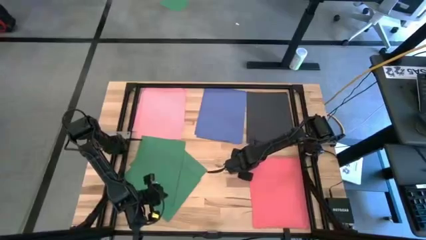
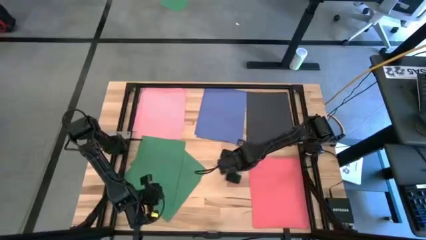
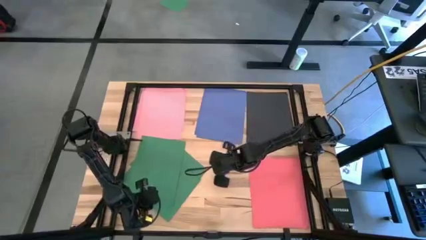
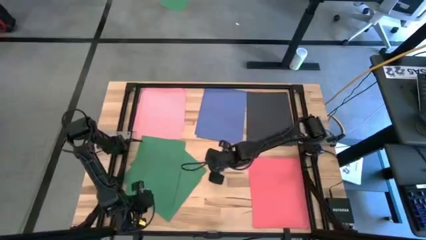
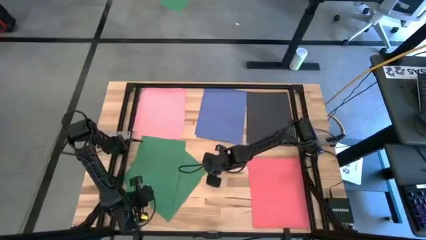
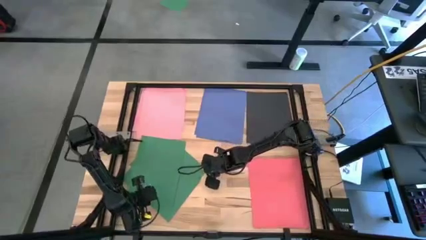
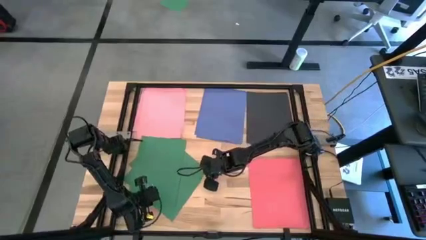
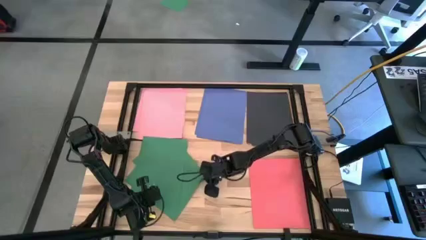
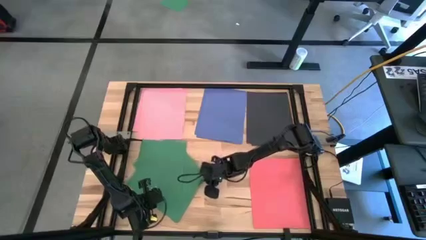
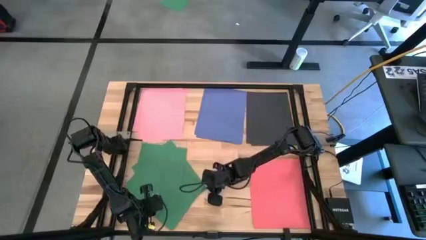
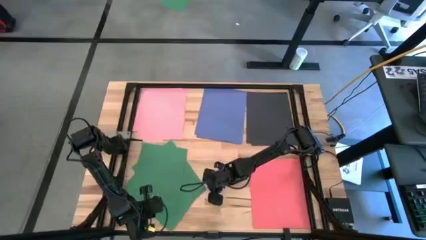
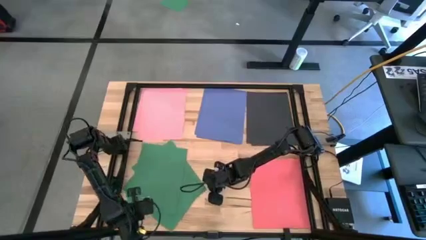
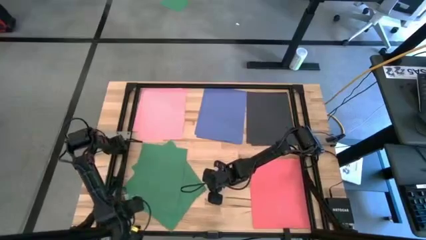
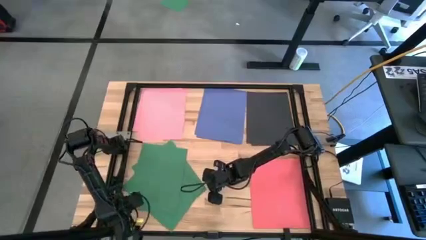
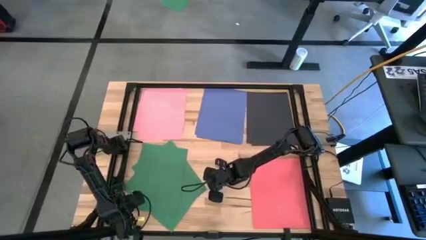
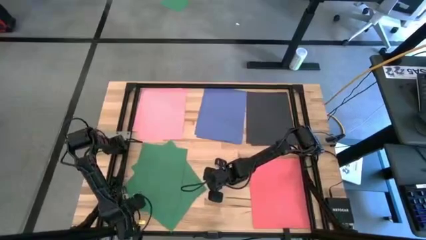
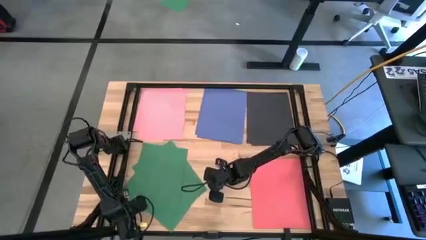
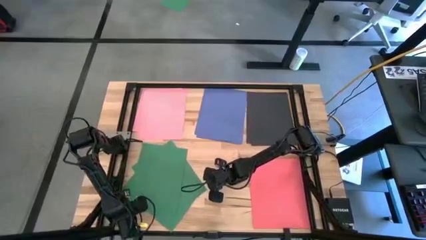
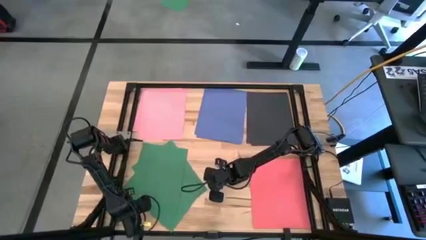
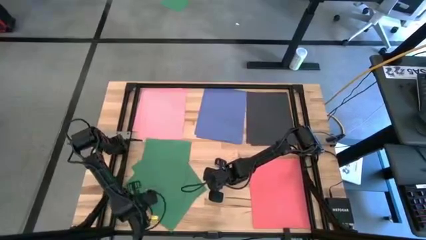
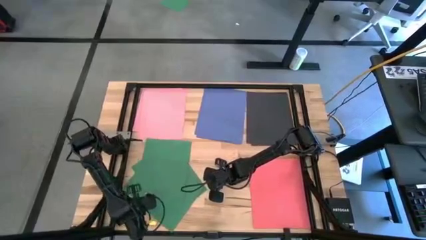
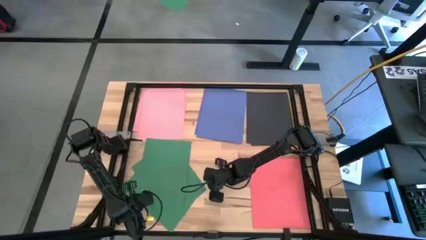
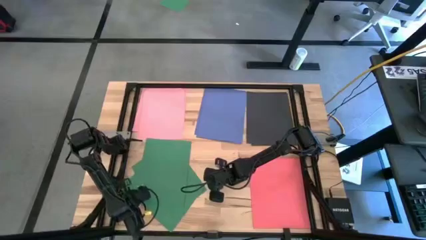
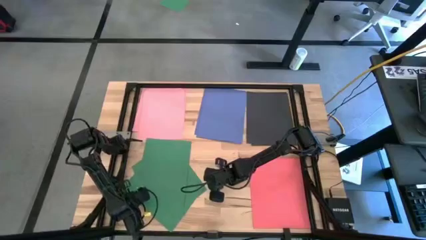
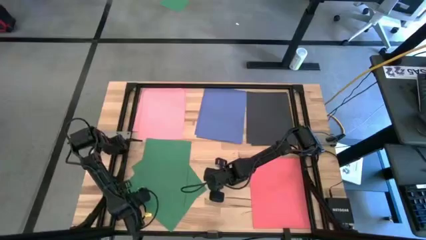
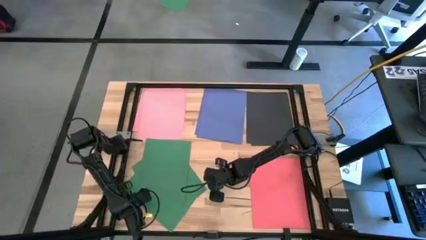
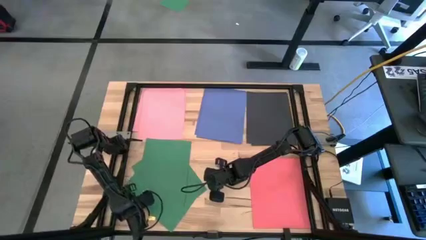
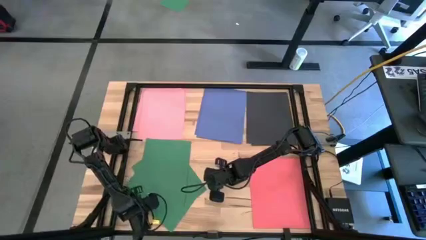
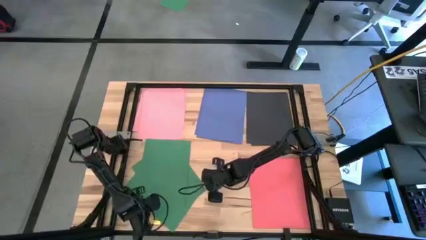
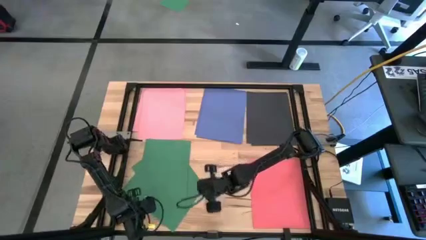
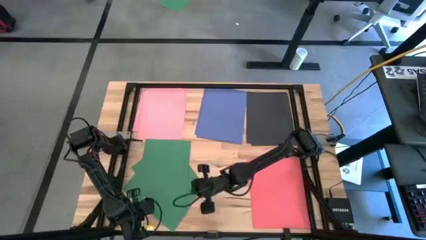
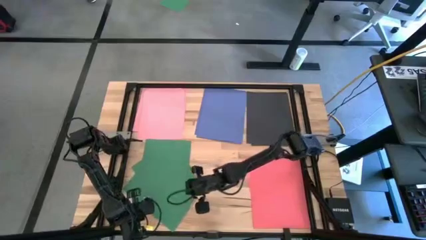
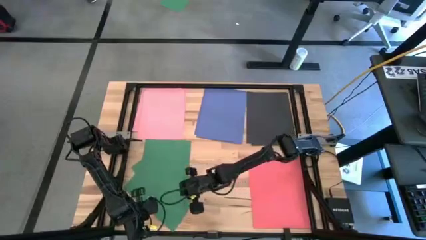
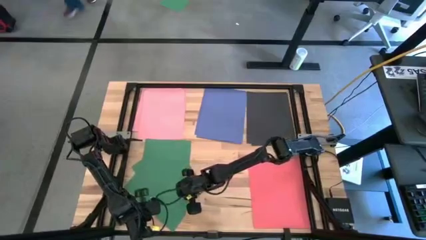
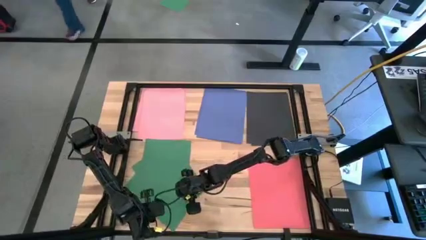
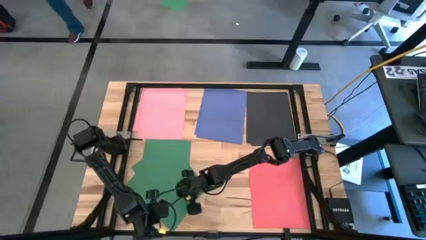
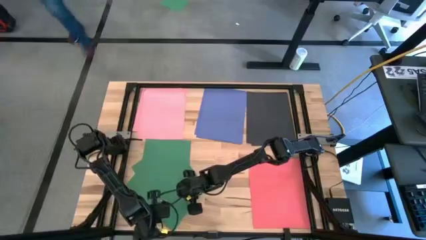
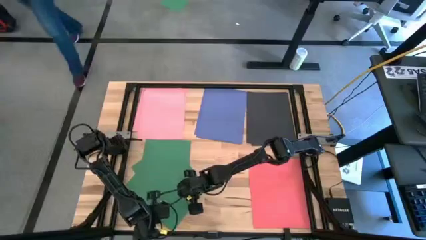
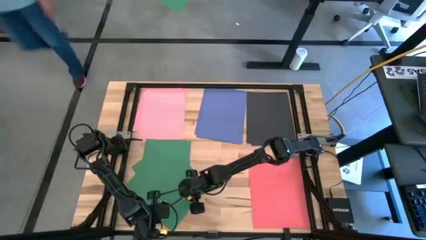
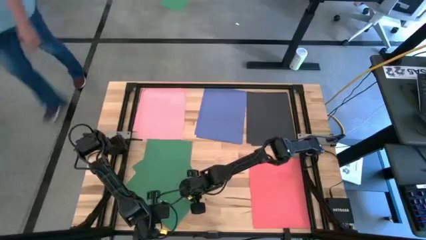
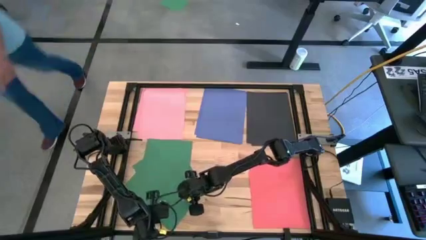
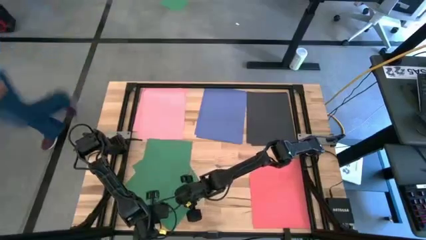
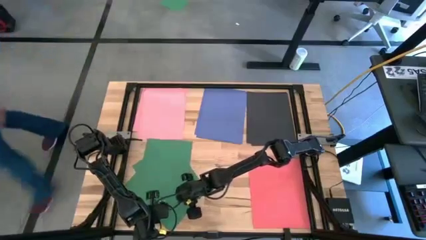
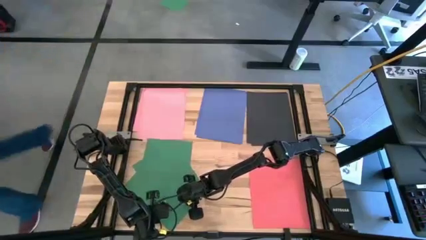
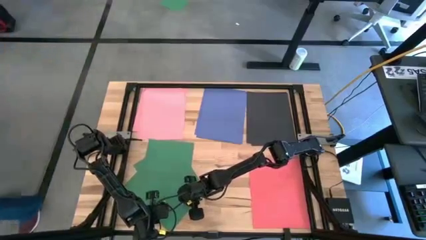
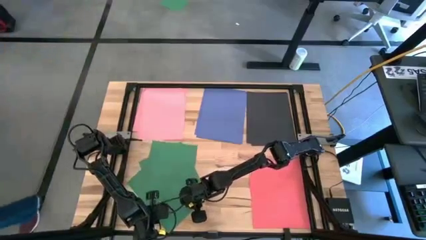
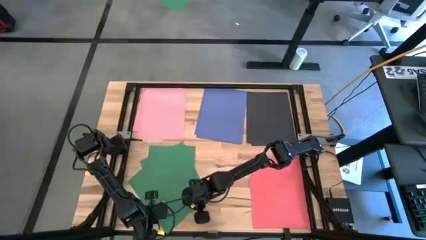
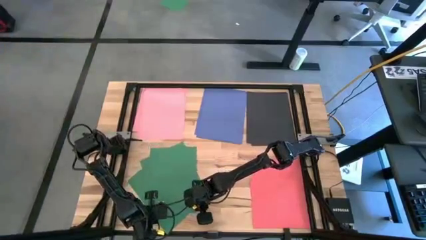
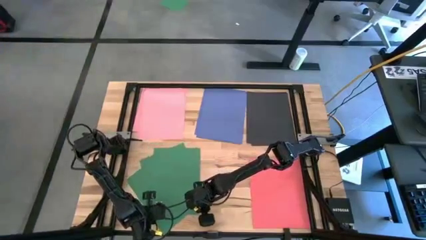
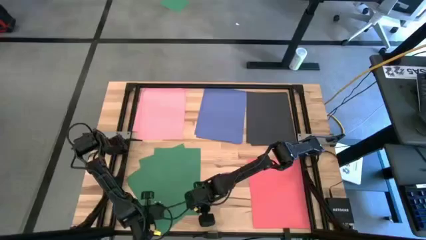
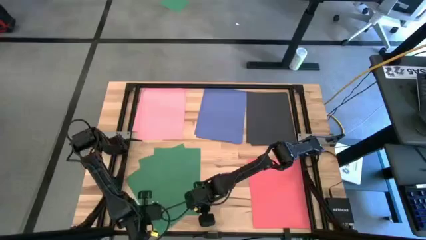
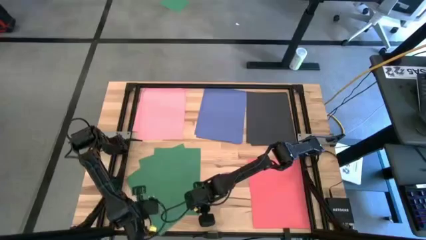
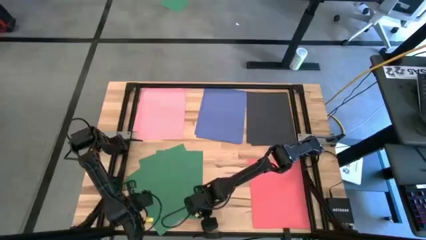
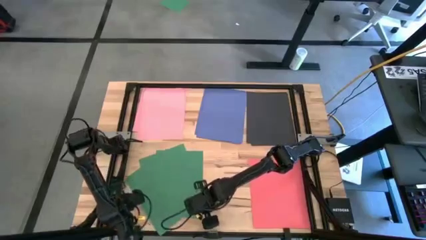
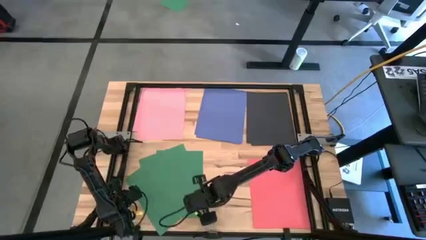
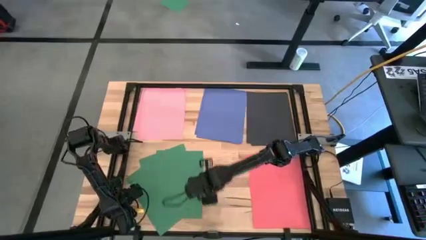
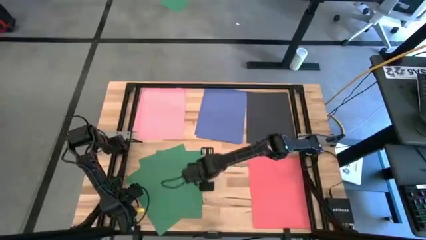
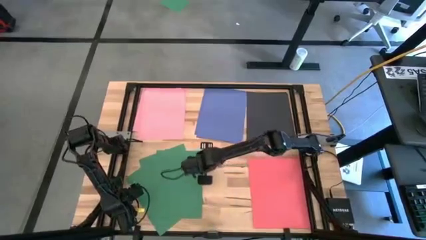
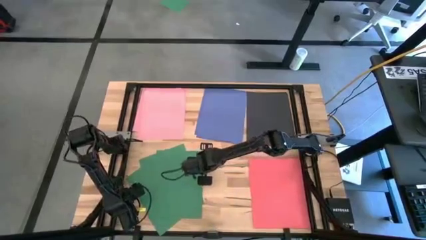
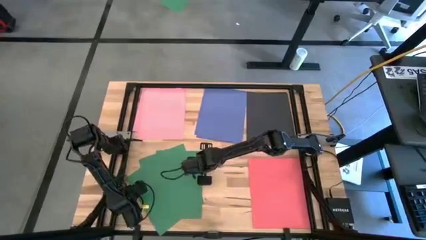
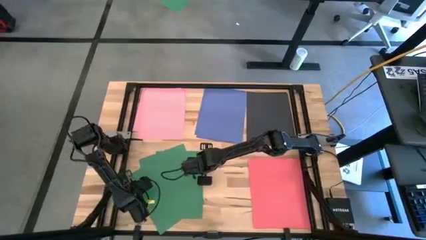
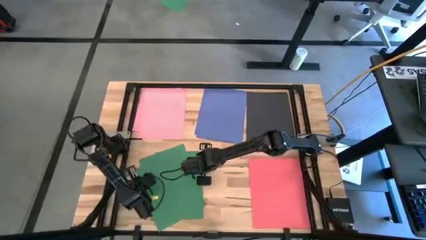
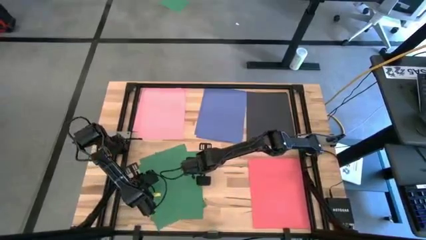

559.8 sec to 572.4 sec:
Task: Organize paper
Adjust the green papers on the table

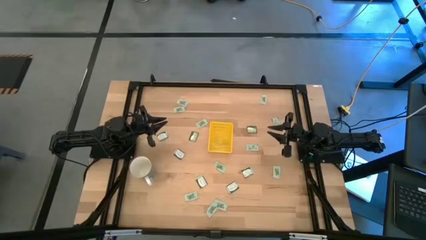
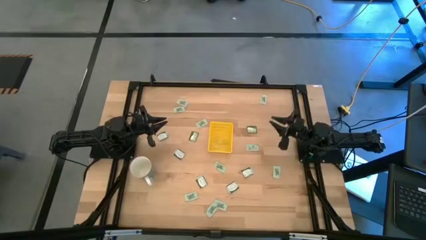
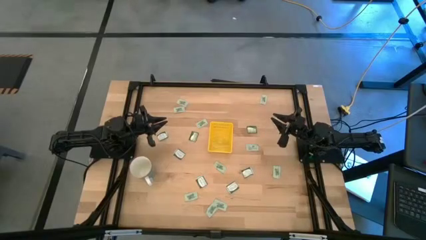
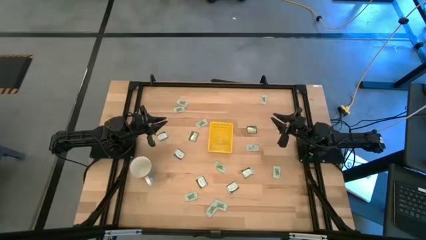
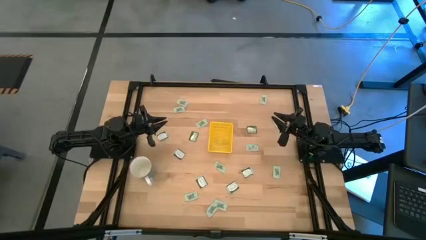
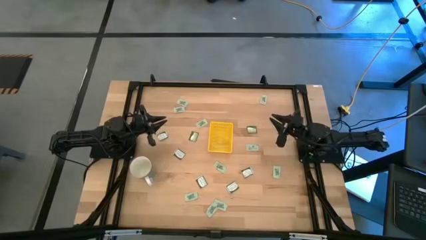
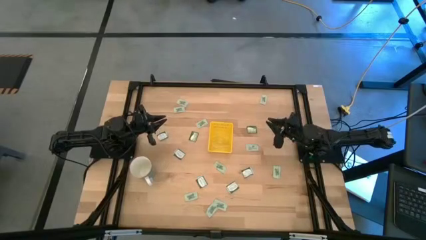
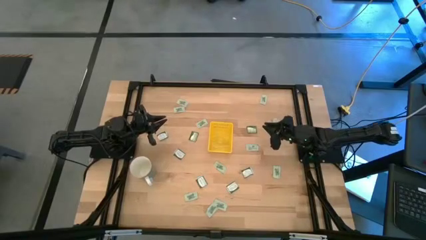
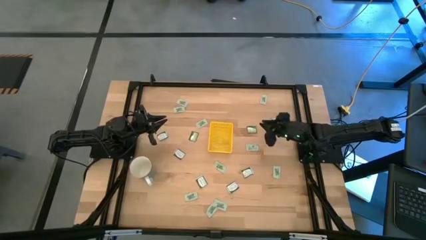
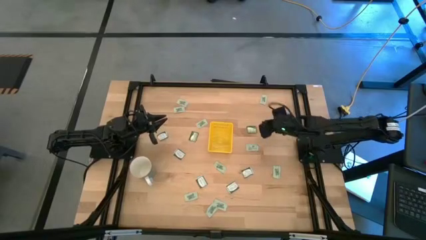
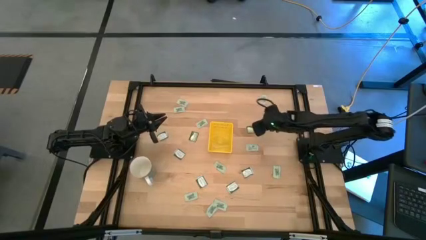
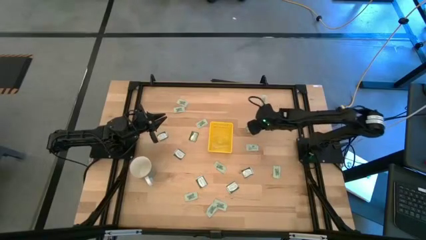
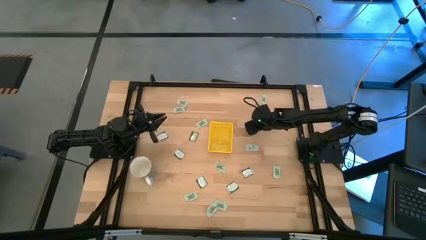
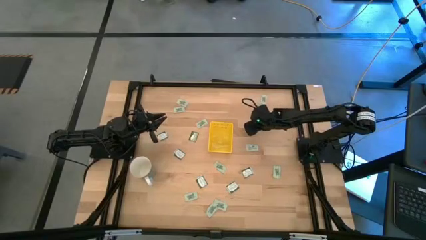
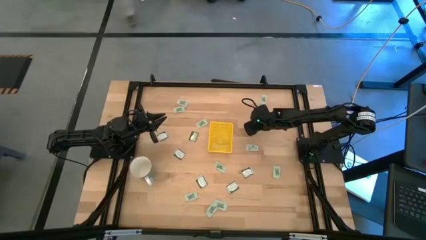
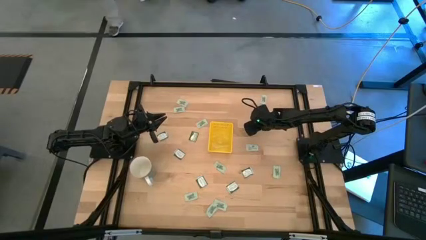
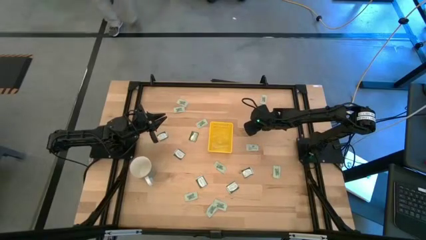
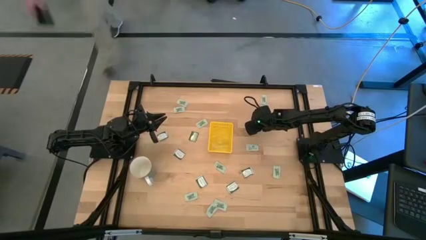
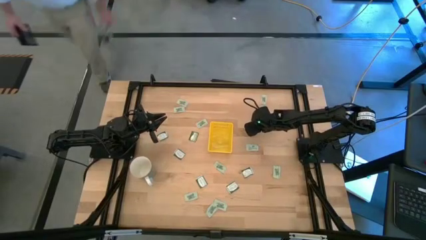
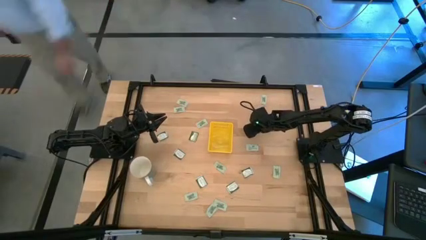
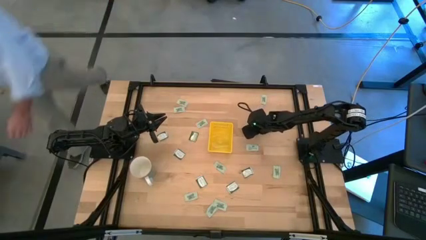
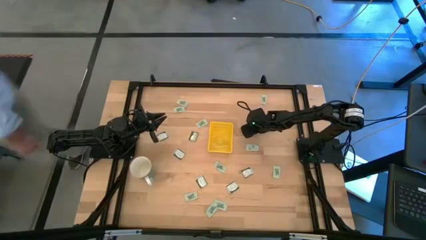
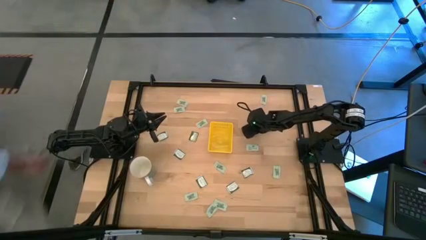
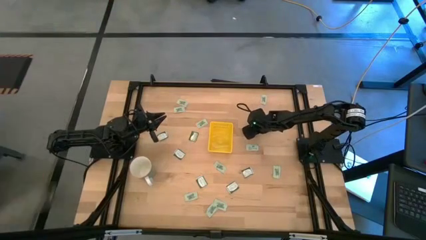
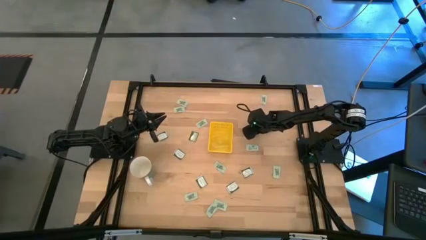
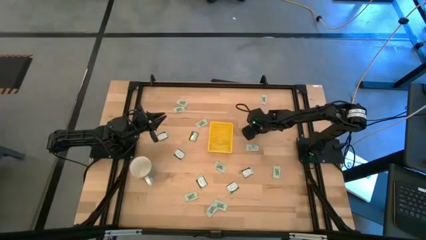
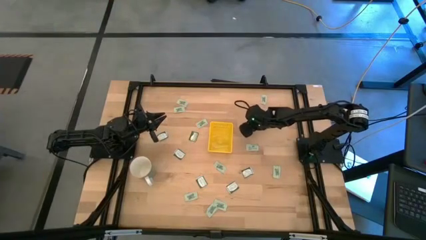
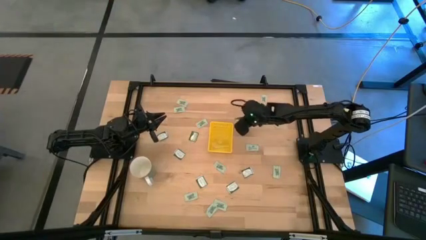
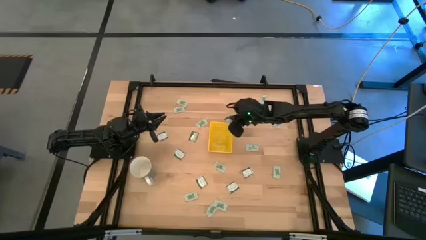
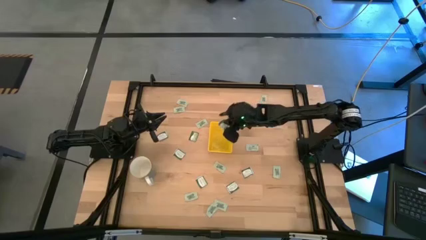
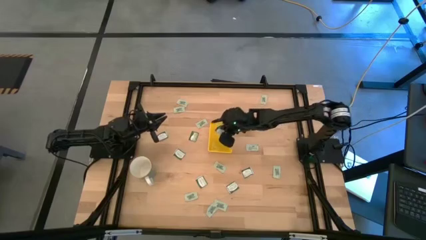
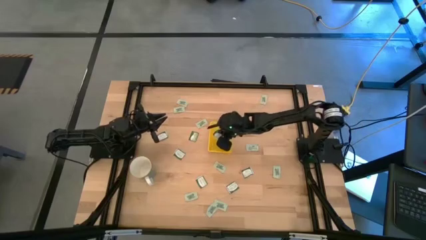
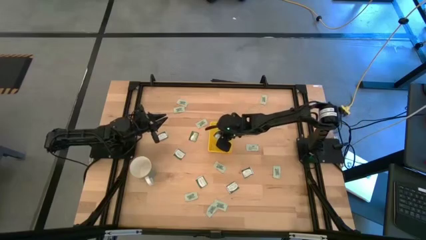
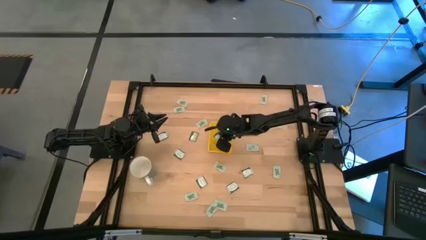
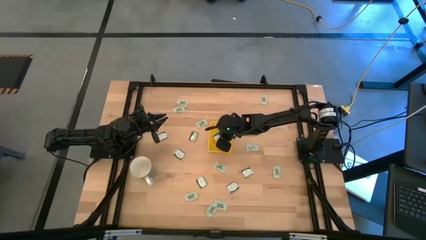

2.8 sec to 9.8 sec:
Task: Pick and place Stevia / Truvia into bins
Put the green stevia packet into the yellow bin
